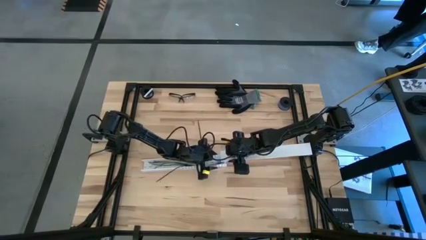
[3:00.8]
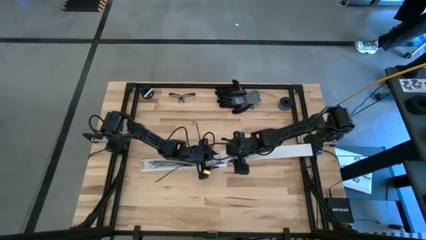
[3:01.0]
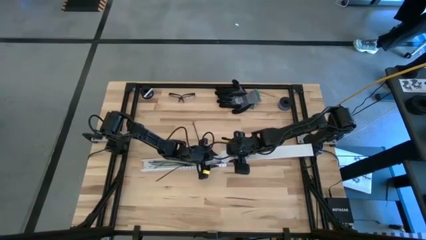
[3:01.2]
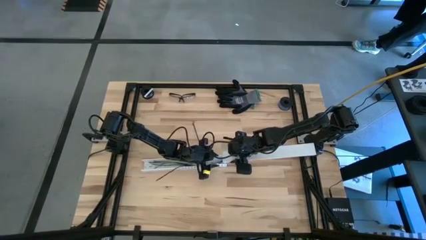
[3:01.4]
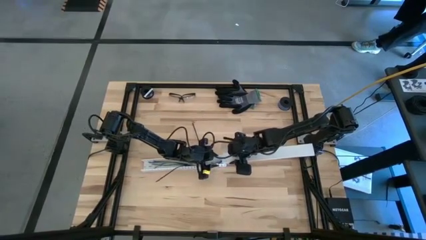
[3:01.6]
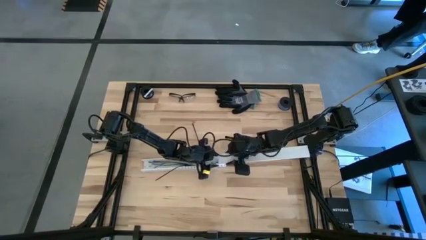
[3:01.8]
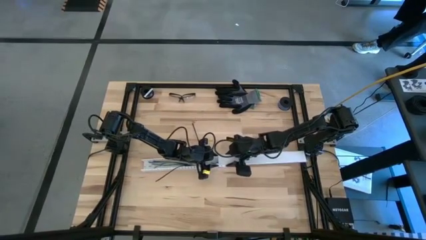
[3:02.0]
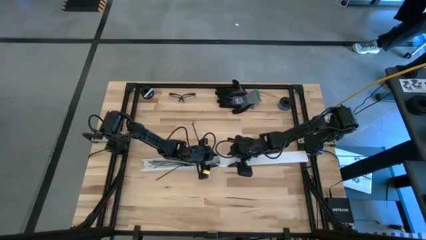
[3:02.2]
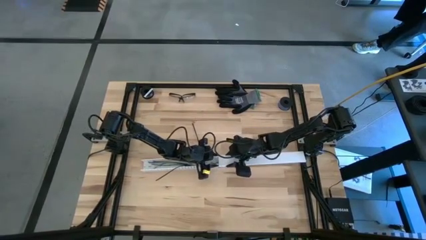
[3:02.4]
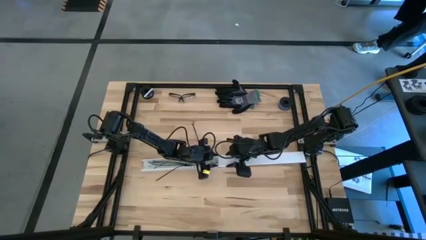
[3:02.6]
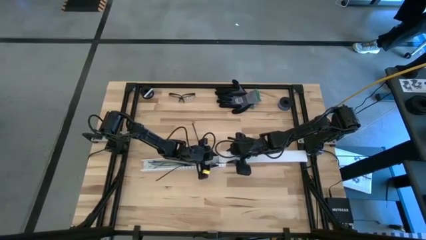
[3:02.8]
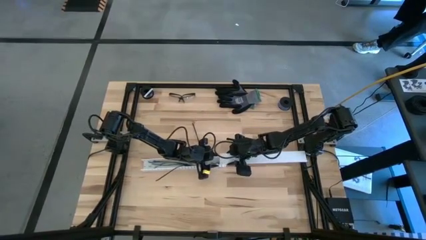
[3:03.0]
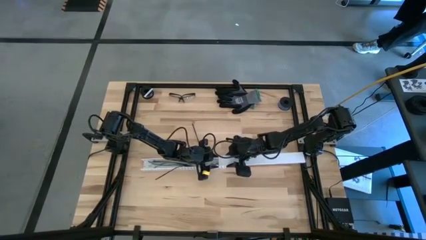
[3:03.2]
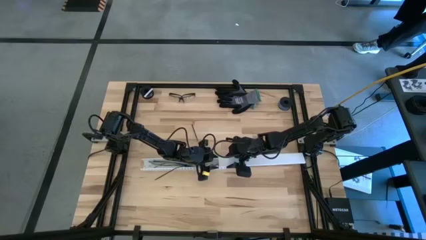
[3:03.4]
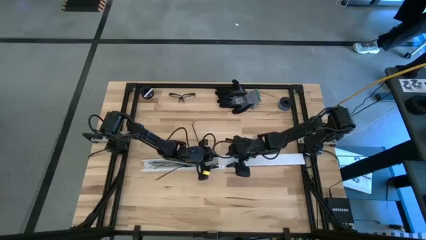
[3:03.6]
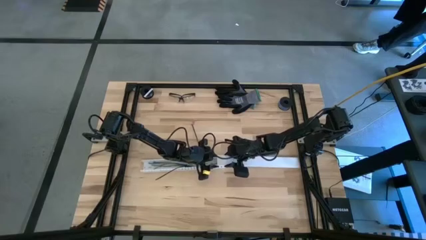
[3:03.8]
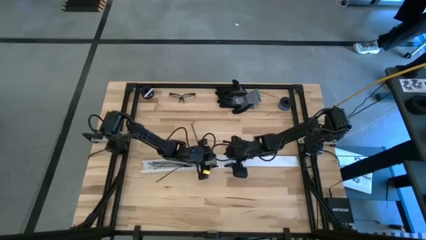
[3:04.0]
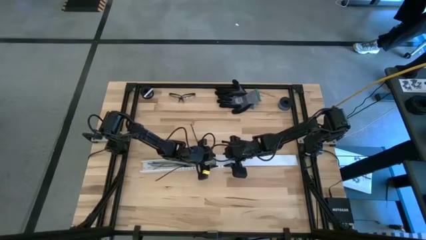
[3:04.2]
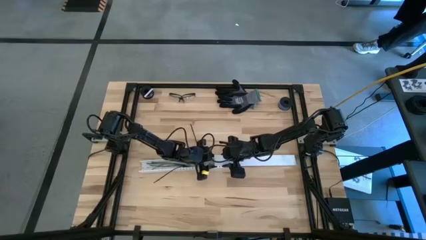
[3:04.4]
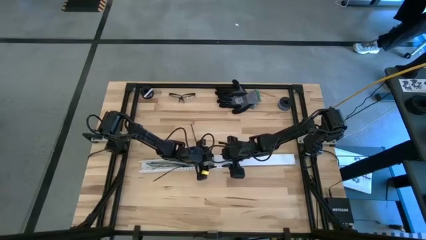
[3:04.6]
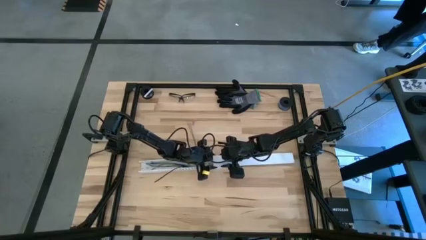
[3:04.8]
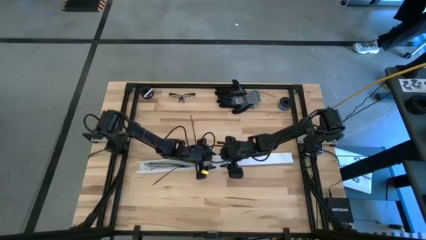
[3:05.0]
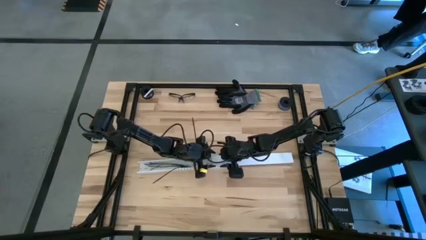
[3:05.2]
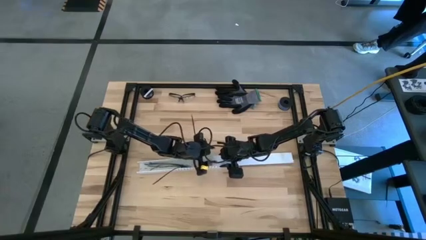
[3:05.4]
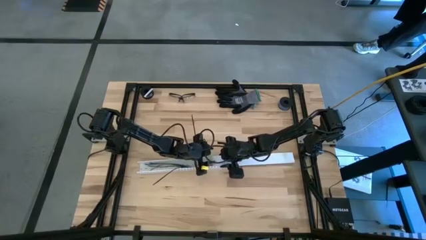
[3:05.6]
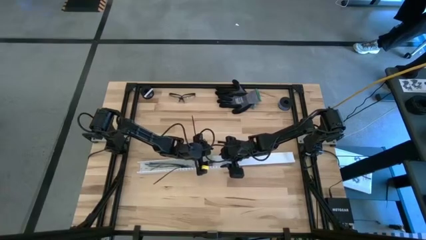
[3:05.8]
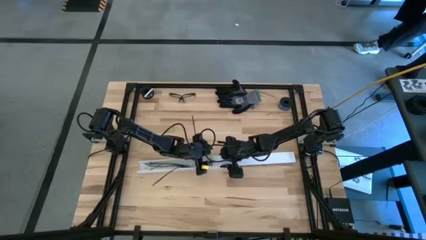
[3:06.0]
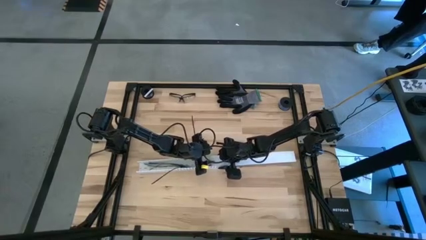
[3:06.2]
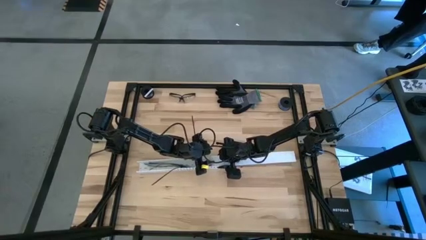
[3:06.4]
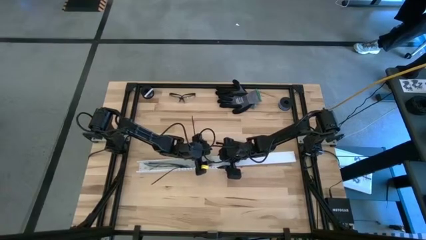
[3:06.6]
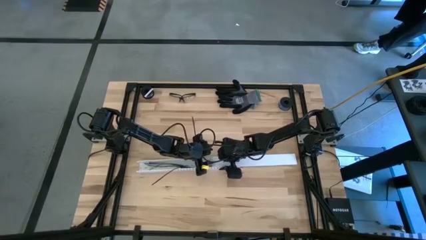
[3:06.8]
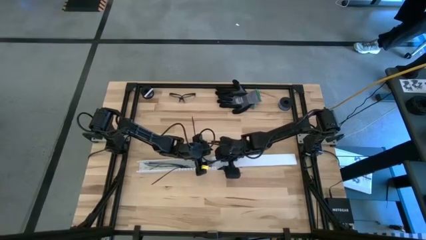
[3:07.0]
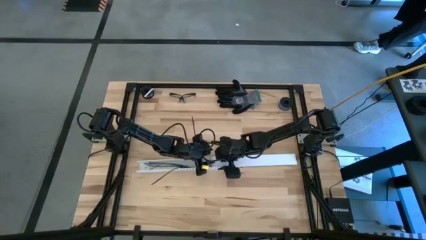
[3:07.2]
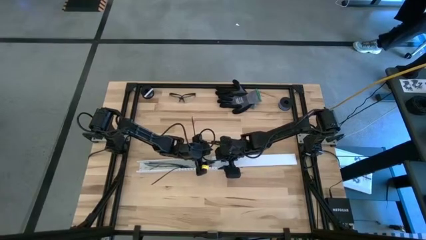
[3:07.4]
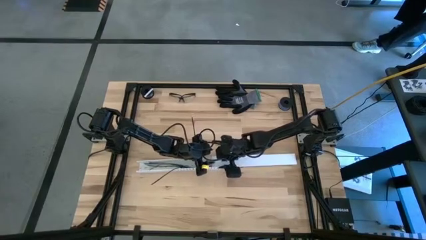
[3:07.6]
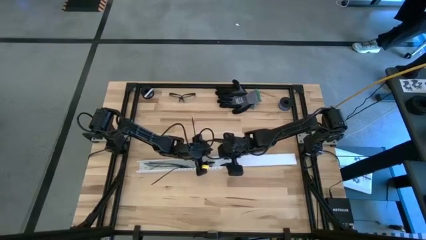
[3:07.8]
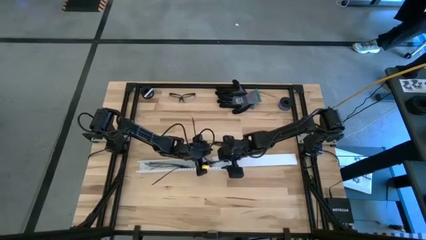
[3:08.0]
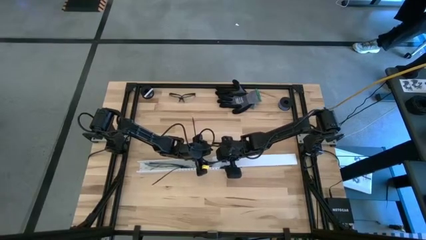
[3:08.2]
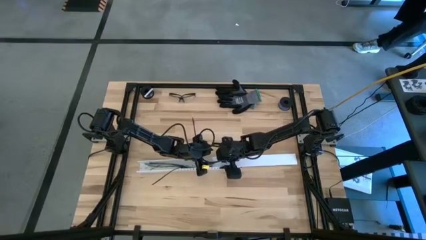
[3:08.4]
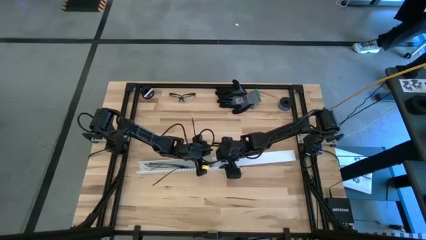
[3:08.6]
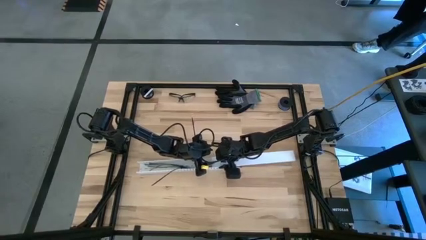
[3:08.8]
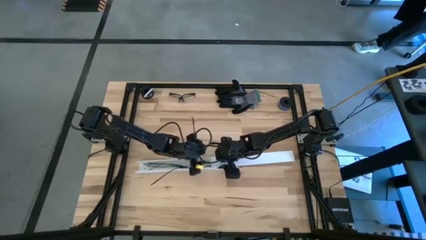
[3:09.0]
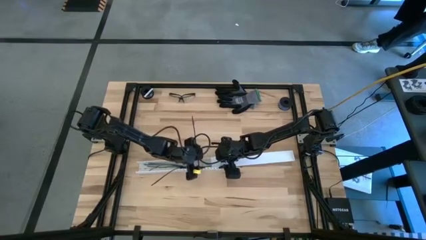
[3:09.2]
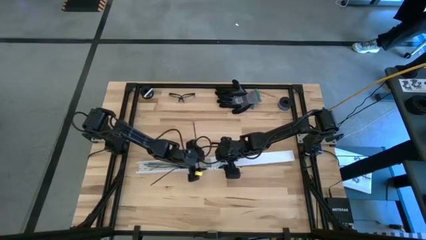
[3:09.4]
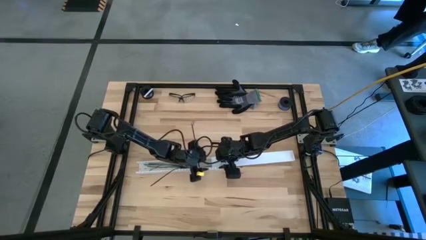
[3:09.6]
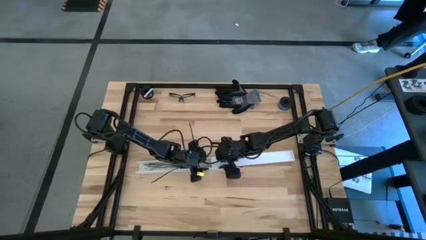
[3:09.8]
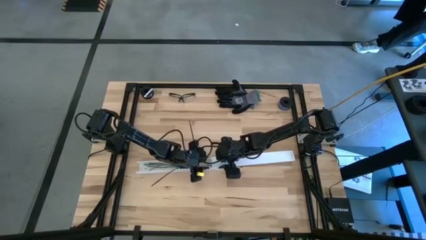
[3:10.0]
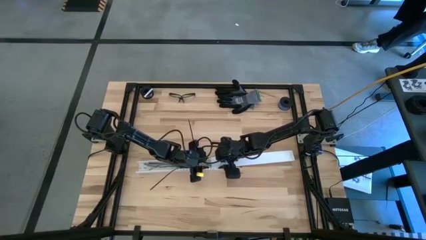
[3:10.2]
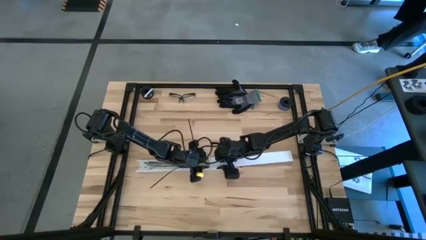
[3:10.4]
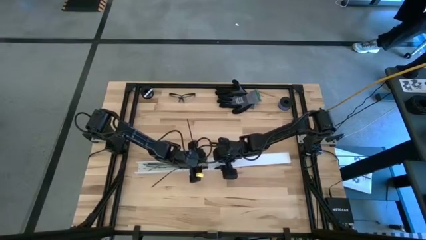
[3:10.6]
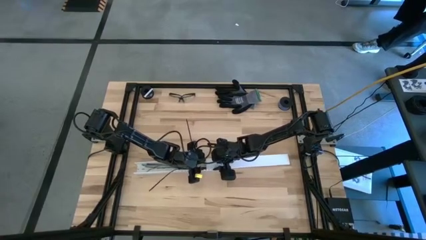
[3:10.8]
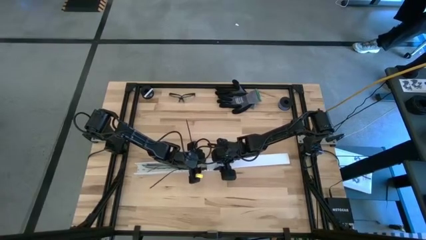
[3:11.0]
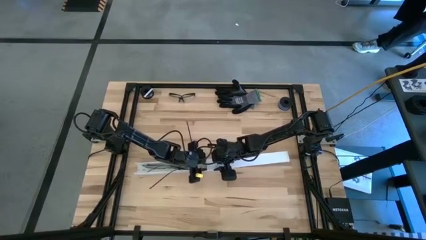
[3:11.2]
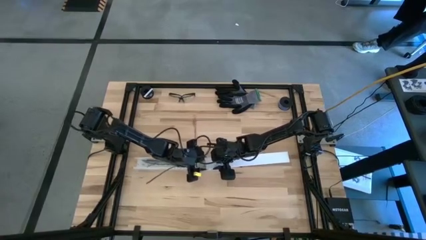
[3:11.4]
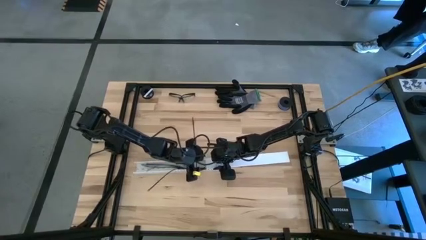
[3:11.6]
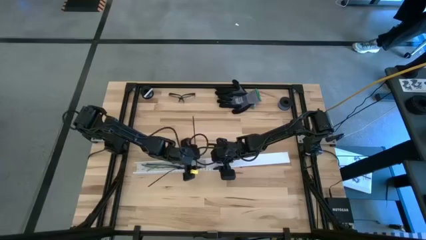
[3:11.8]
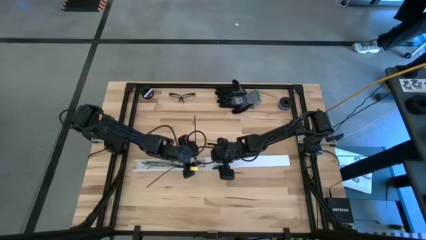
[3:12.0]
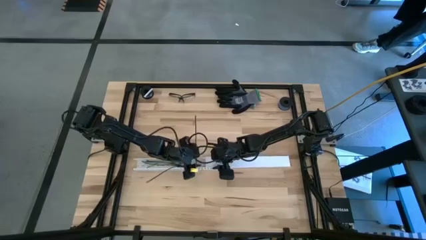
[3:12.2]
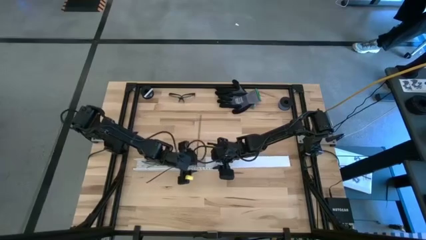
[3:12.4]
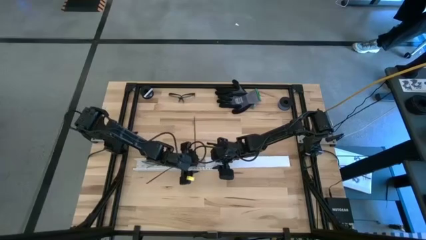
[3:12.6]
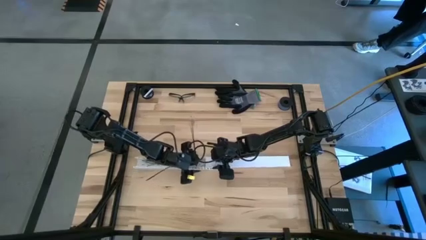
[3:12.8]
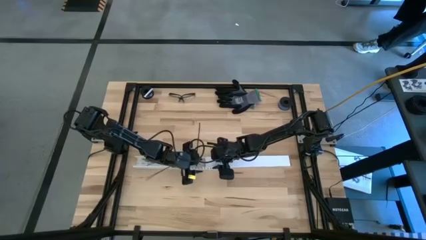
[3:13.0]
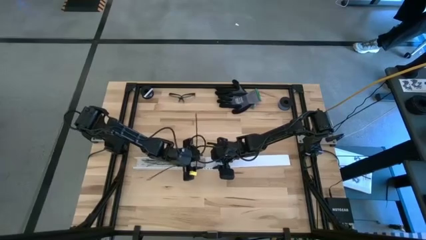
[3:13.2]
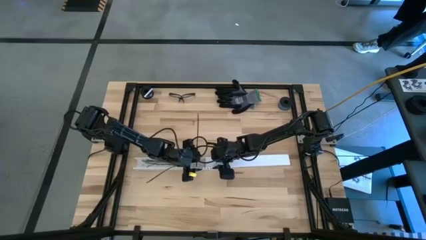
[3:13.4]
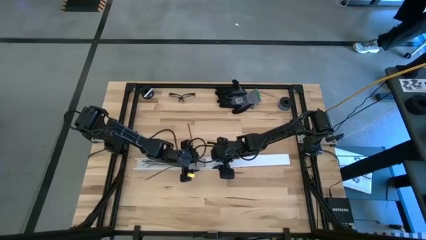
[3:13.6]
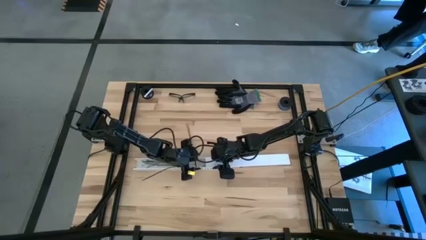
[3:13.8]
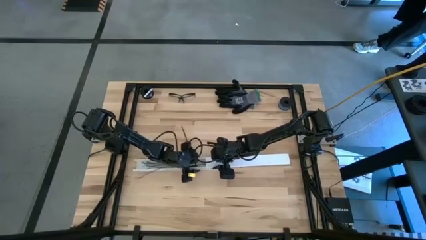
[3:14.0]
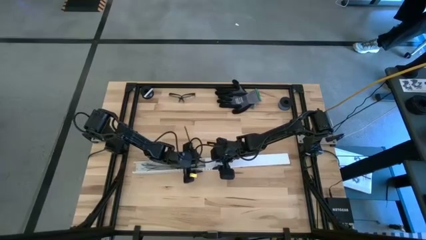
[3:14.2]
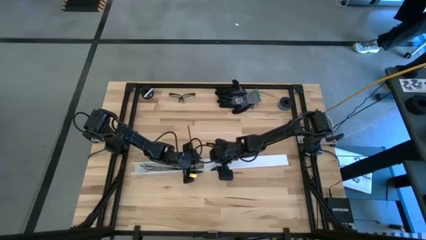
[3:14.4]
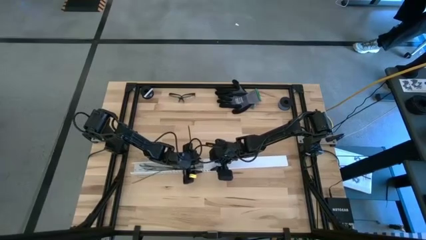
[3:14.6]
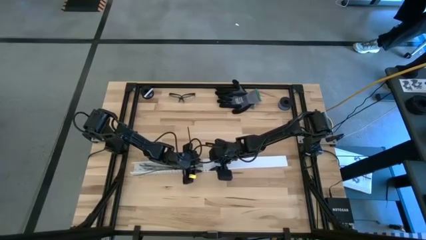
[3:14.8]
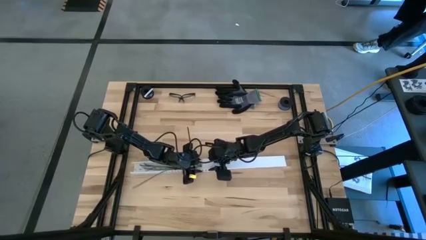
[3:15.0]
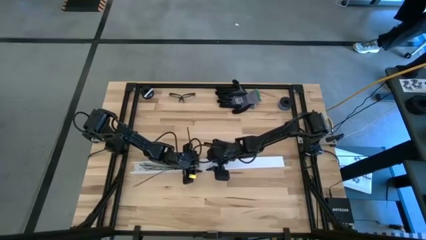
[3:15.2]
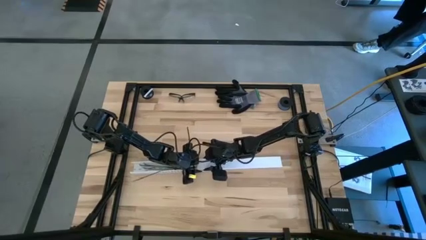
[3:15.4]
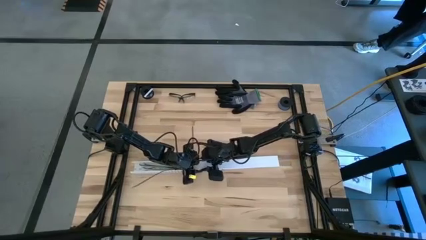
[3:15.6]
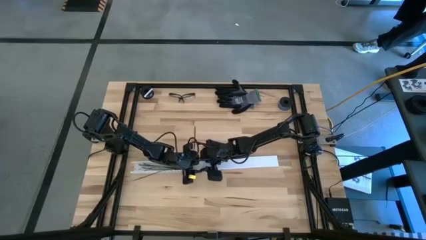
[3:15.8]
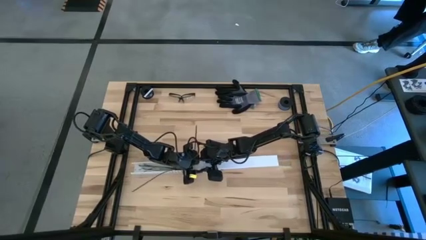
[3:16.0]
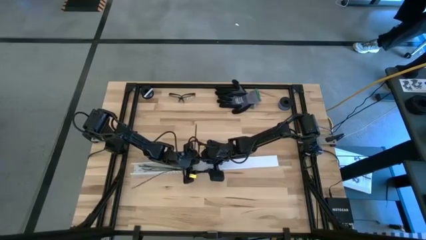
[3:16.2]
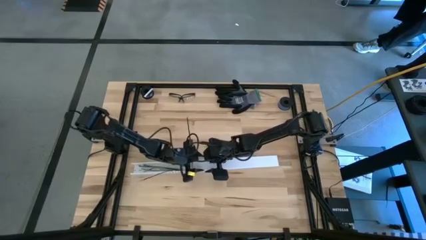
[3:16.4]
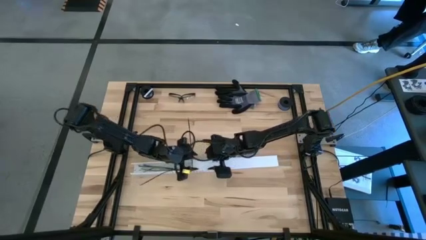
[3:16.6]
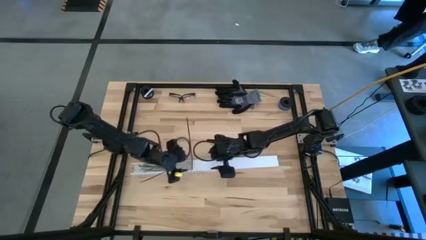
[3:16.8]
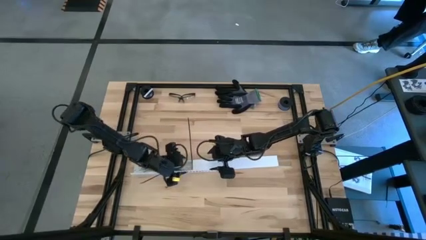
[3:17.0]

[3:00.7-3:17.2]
Task: Ziptie cables
Close the white cable duct
